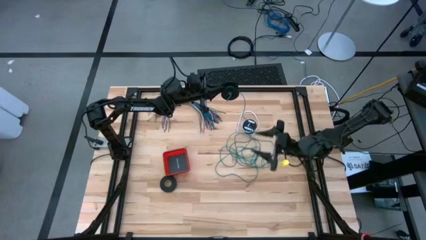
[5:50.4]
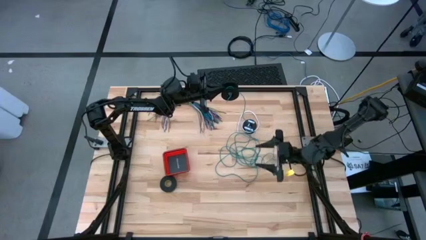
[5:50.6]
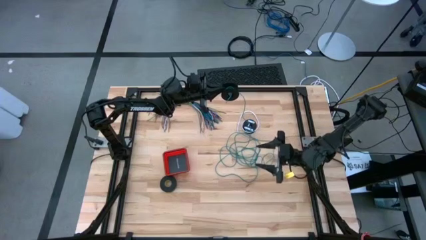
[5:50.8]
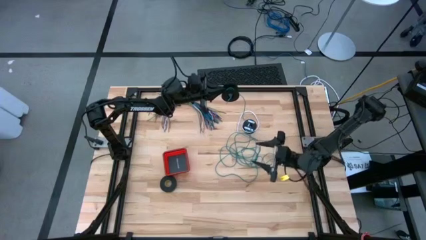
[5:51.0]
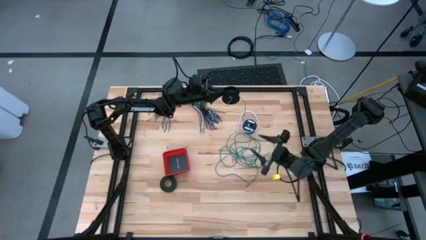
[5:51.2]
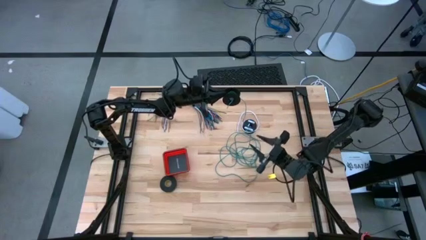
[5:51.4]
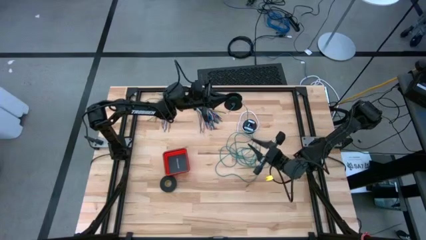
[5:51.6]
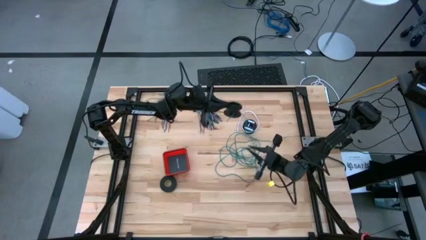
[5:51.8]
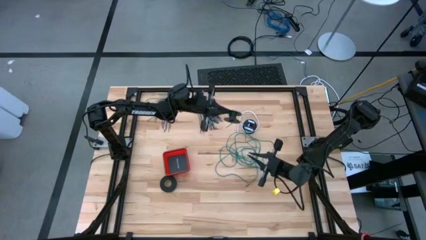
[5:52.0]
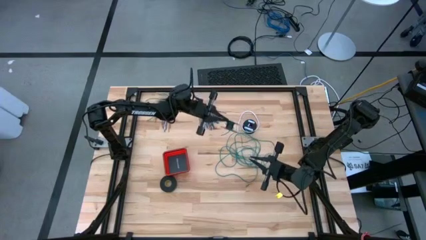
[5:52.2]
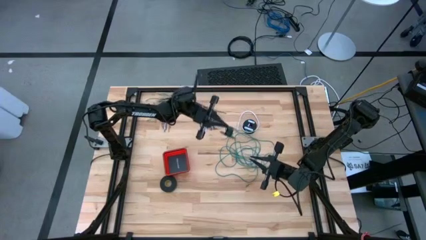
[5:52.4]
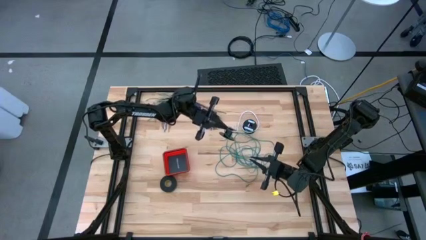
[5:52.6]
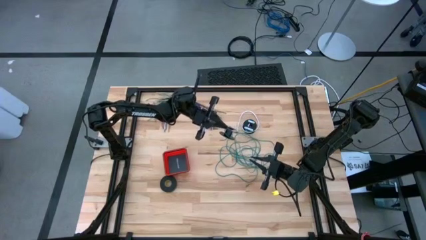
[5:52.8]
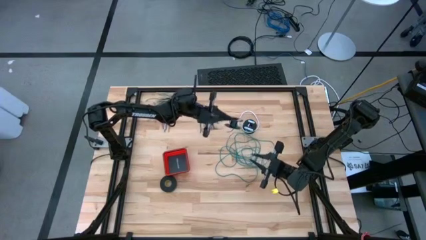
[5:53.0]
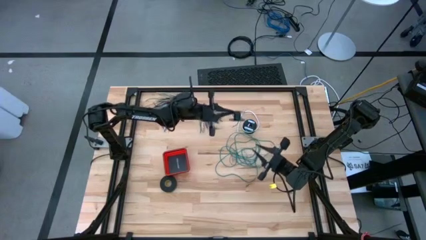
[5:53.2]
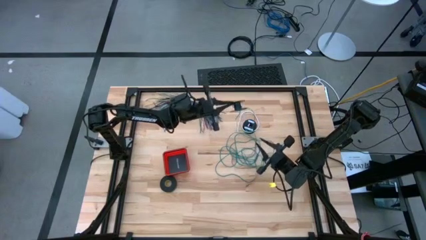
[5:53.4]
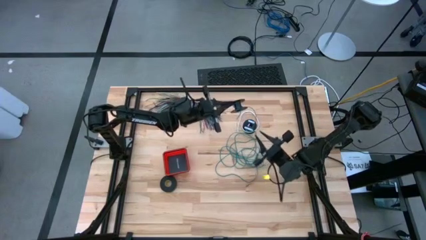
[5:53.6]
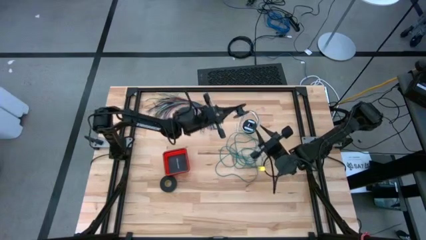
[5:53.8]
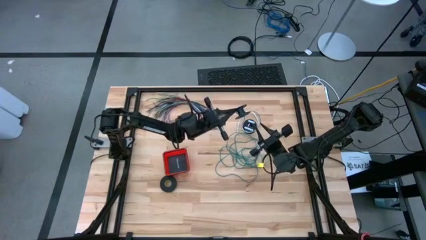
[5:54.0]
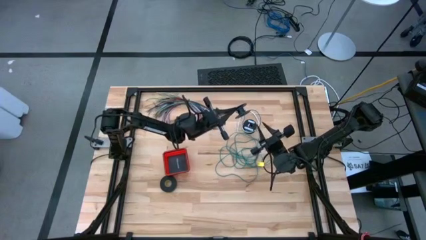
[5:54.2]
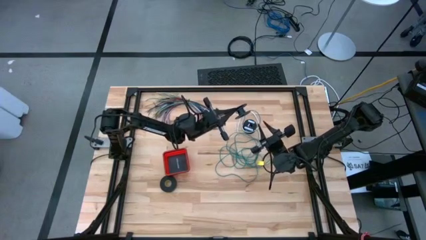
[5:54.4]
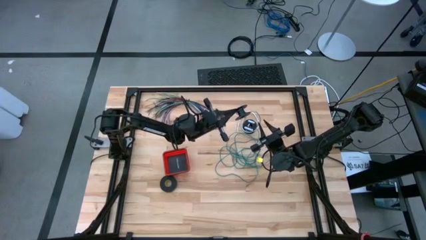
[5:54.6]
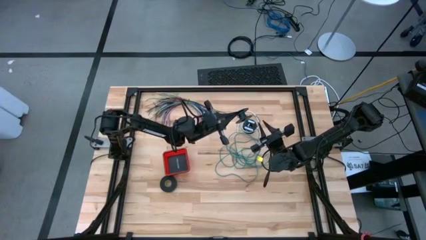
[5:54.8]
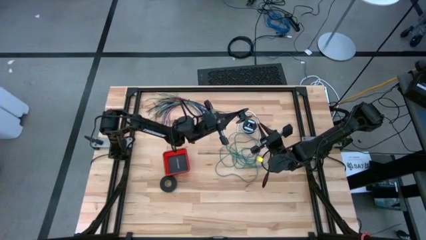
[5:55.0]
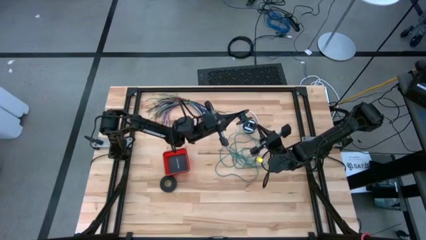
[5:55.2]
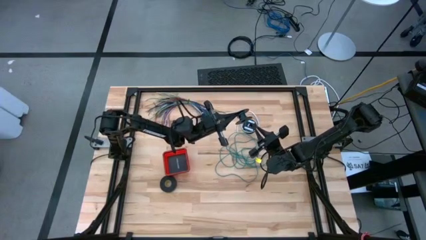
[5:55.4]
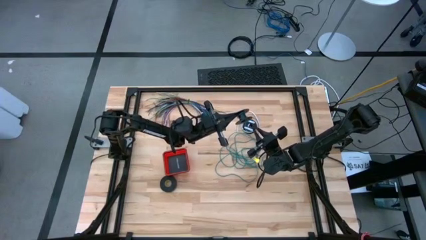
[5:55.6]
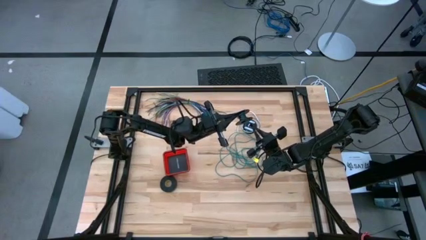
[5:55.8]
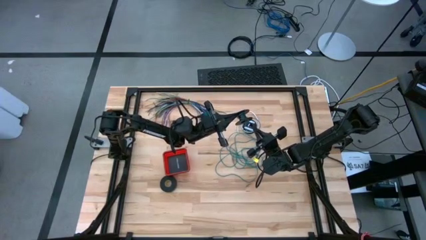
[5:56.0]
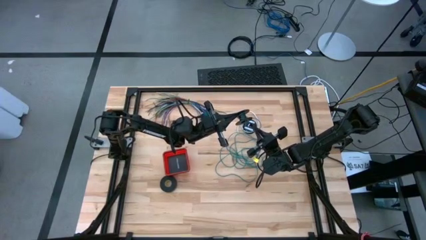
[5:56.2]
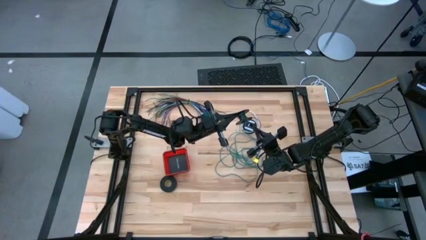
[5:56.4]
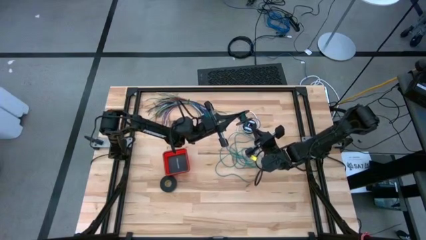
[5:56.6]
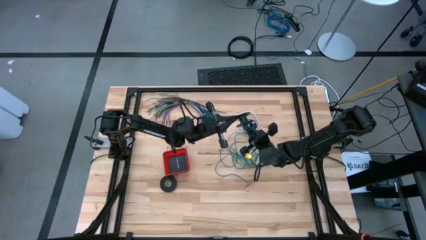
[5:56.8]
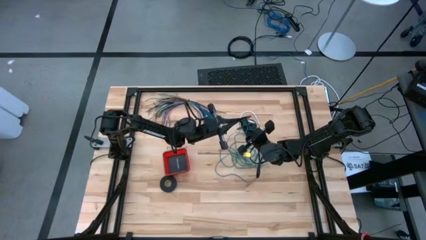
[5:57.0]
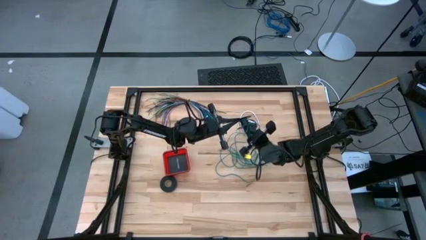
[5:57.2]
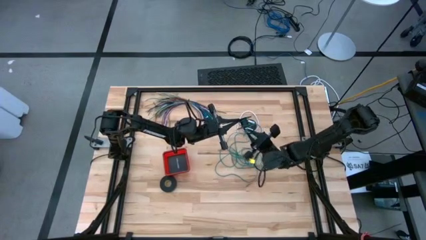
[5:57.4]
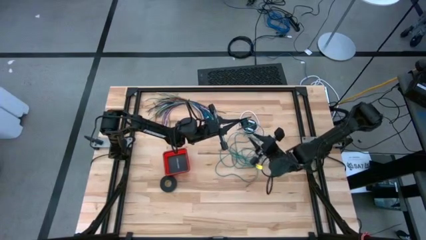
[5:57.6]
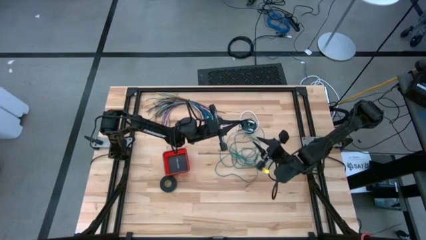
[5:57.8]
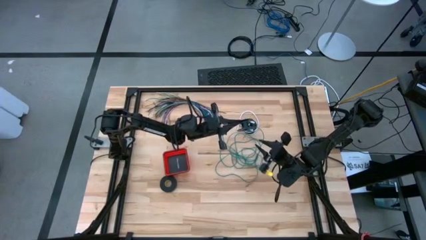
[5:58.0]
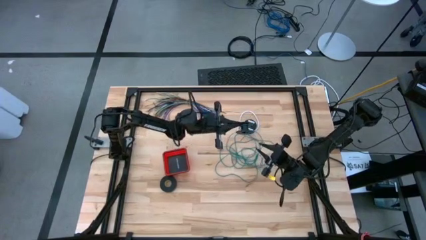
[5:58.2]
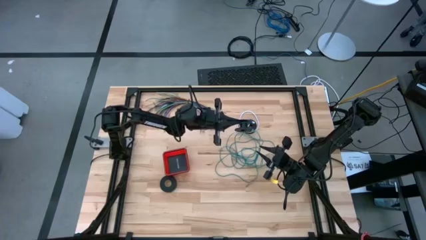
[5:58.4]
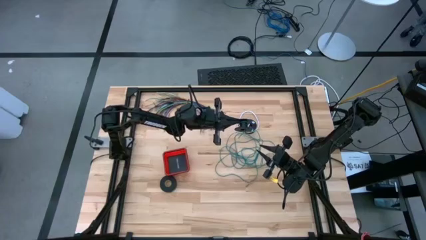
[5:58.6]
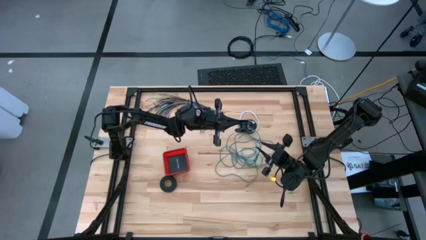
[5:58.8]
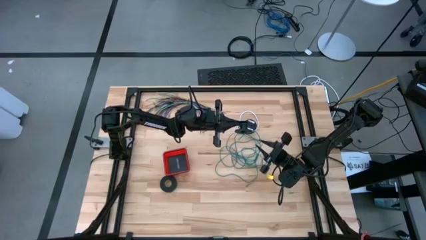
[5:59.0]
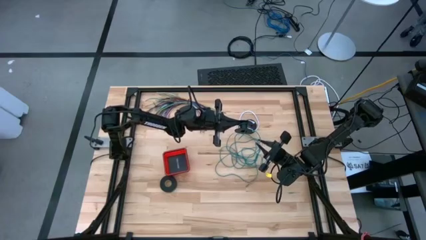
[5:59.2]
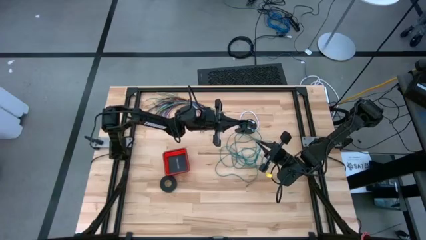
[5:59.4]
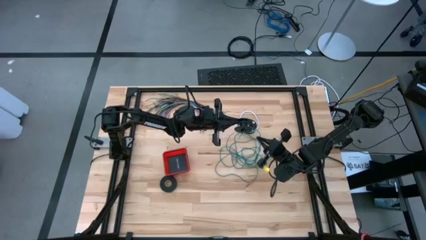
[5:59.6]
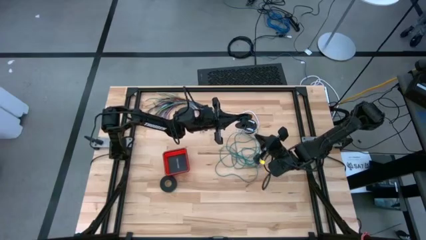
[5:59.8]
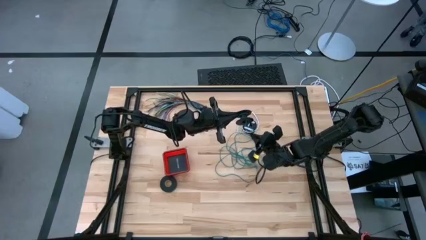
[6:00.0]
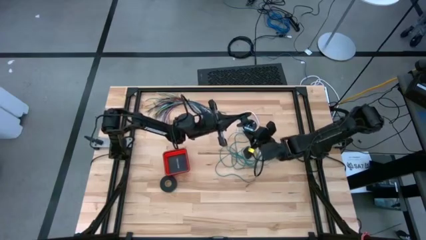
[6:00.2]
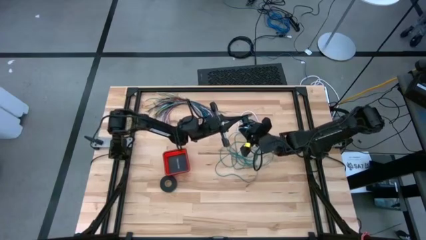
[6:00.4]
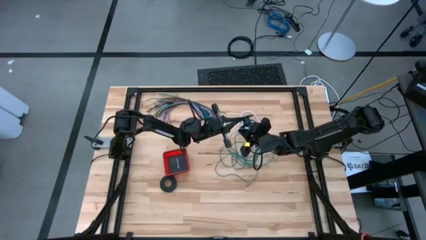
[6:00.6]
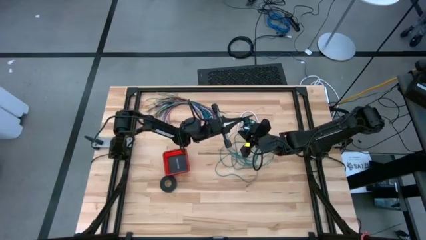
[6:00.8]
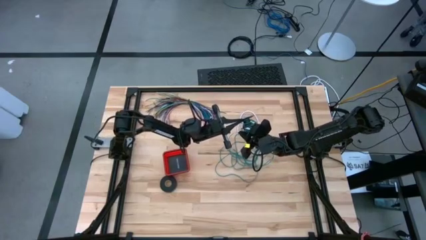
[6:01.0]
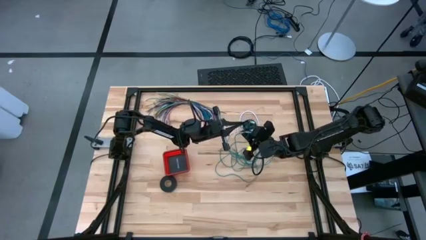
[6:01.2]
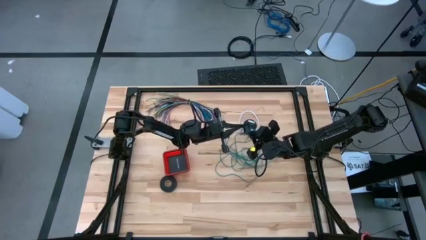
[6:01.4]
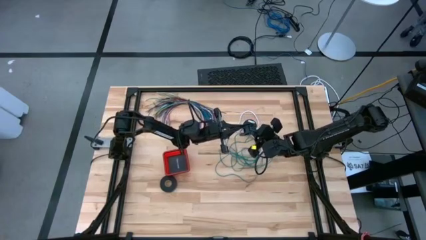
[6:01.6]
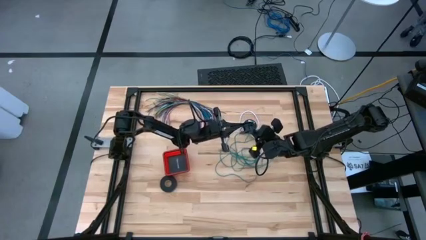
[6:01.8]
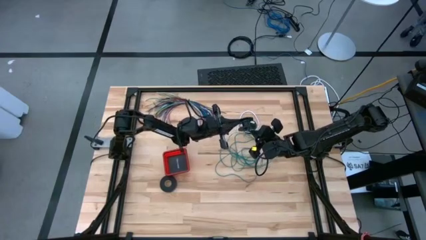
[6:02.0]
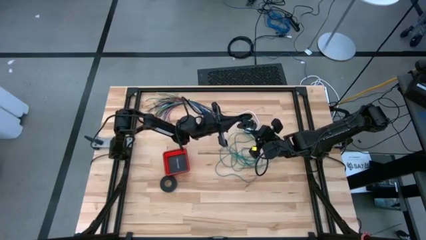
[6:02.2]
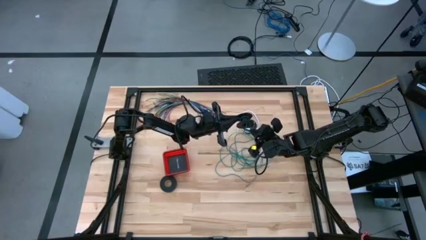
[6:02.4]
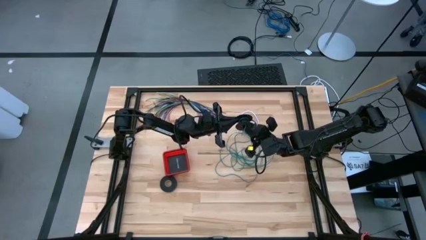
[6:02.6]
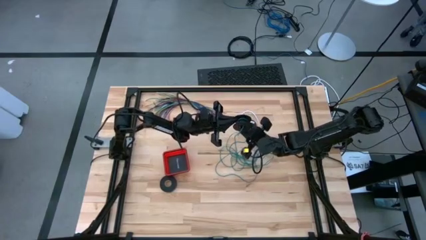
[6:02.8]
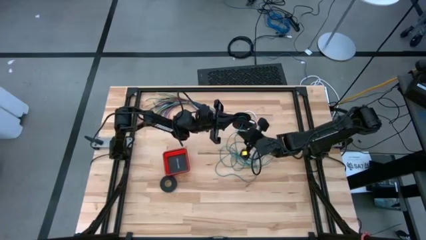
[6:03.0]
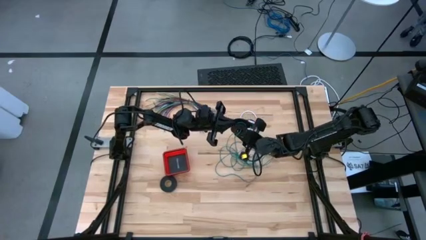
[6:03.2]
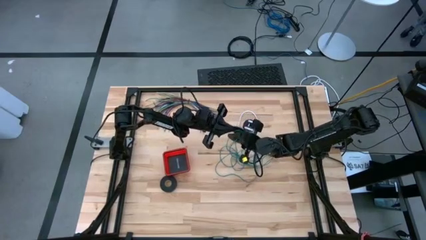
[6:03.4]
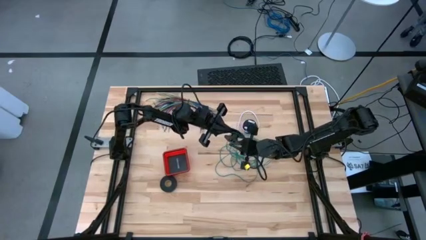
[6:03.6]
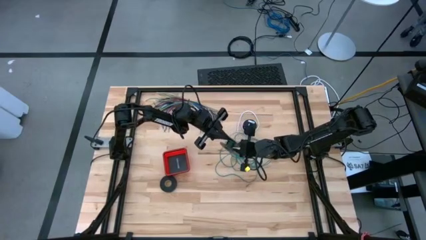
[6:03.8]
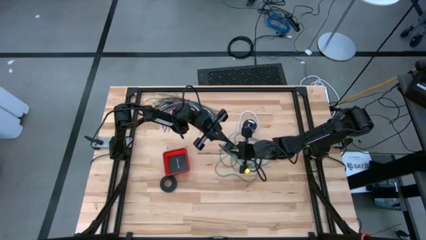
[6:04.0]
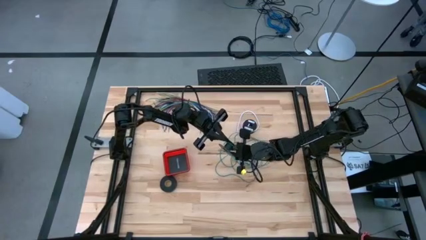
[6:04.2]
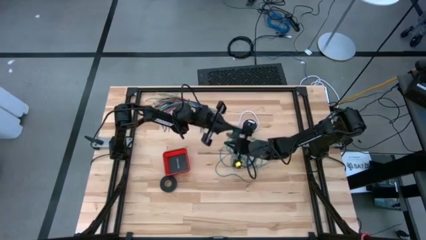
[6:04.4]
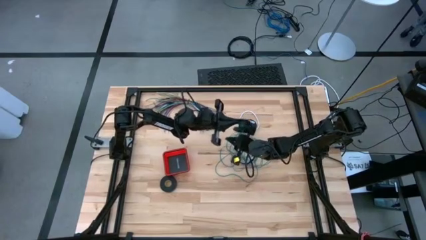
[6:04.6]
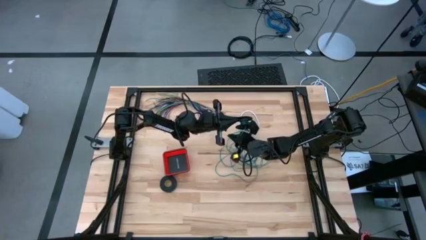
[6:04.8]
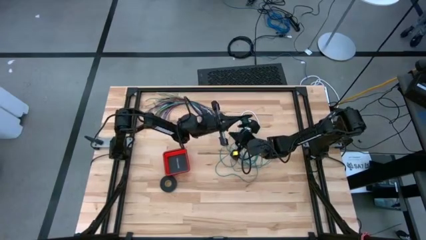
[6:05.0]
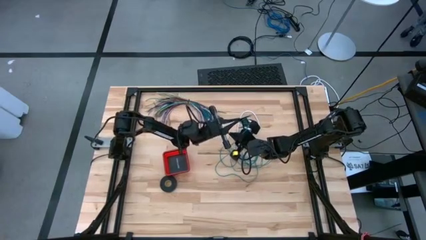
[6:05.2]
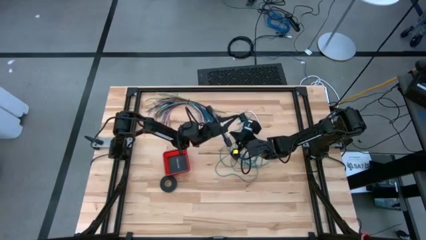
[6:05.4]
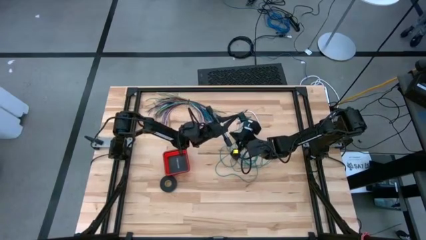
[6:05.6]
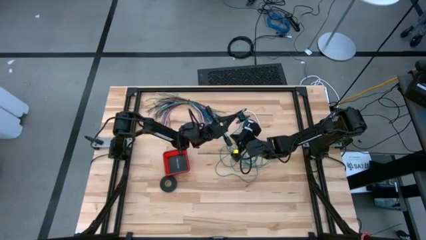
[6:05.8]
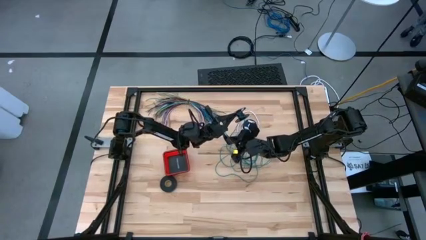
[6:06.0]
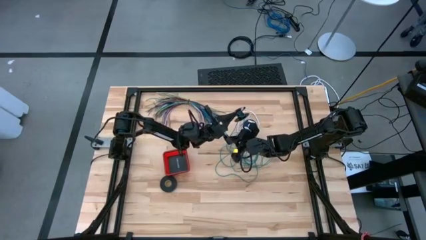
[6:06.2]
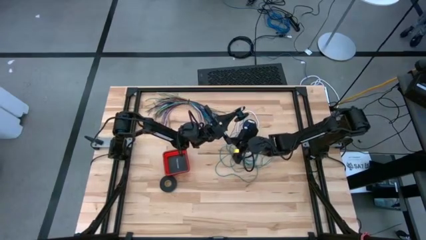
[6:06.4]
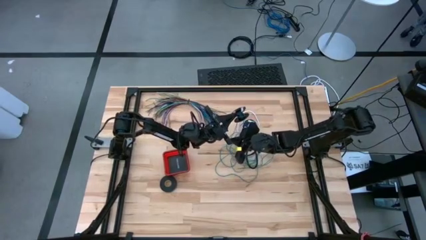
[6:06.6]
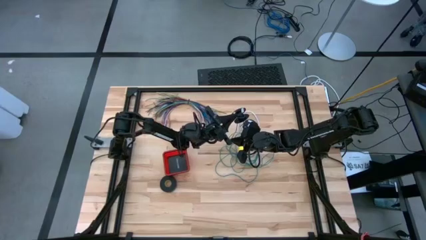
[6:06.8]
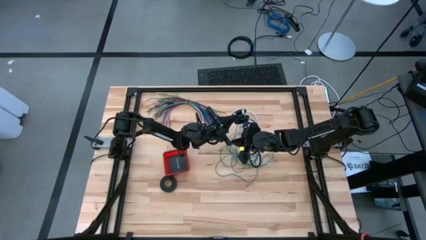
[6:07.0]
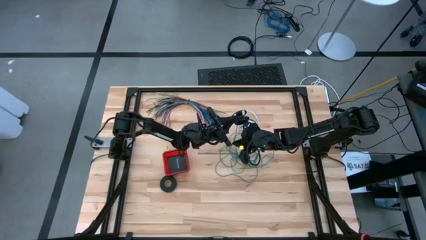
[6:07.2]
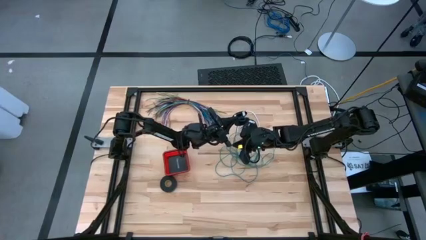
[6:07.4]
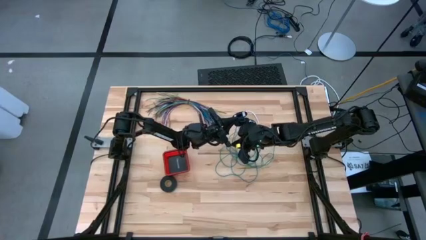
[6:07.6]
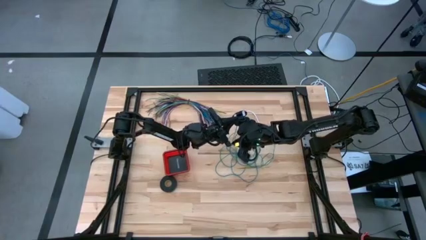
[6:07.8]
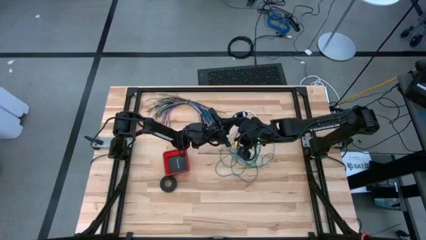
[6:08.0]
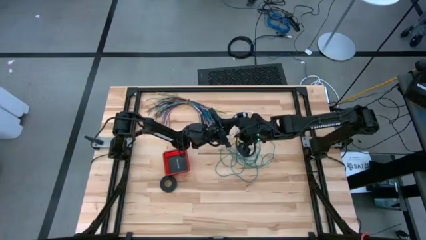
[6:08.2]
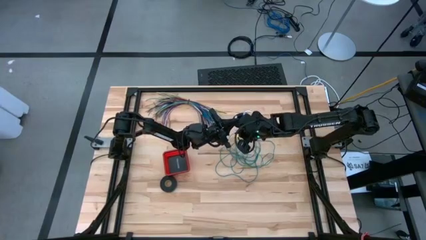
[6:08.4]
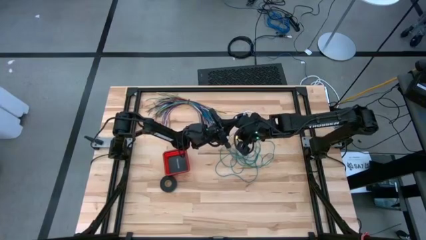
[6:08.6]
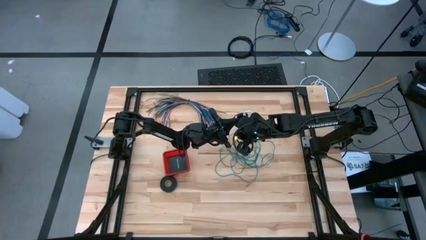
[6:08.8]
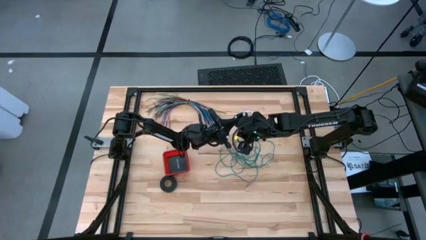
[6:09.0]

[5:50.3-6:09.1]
Task: Coil cords
Coil the green wire onto the spool
